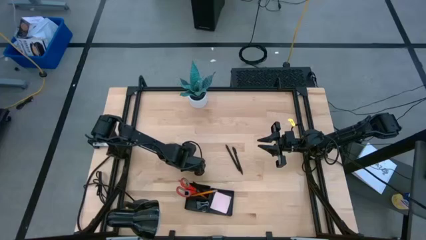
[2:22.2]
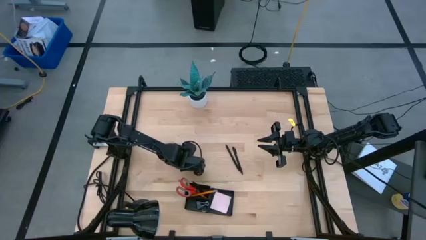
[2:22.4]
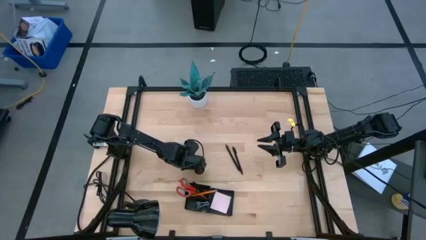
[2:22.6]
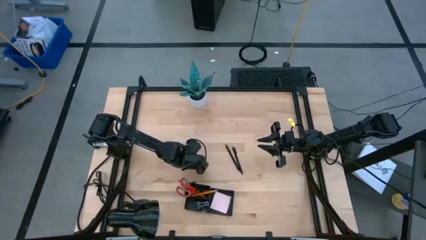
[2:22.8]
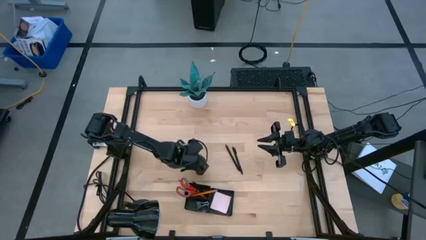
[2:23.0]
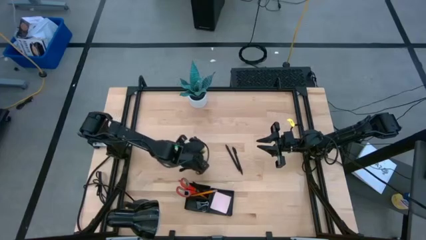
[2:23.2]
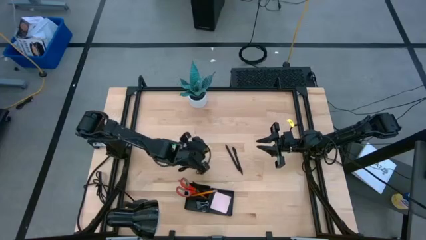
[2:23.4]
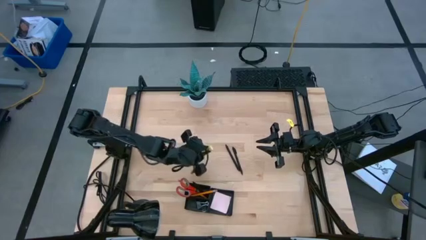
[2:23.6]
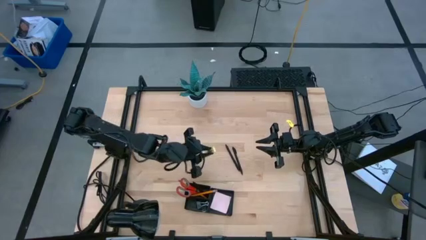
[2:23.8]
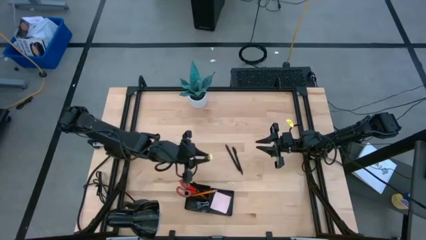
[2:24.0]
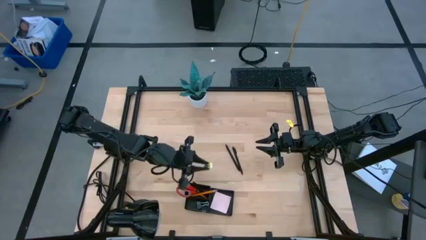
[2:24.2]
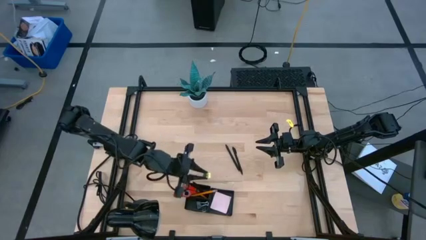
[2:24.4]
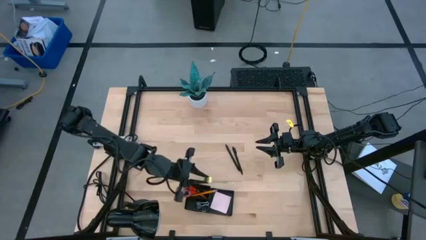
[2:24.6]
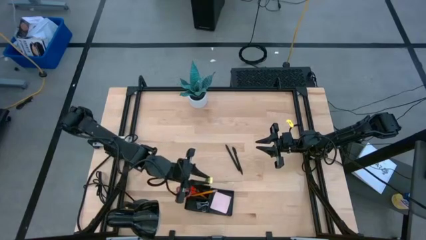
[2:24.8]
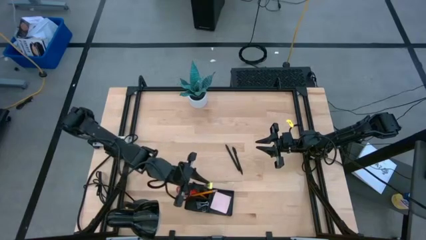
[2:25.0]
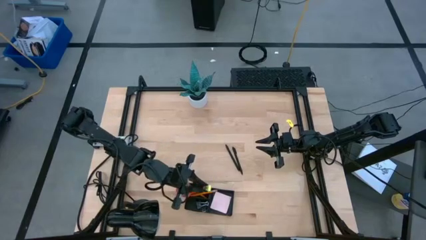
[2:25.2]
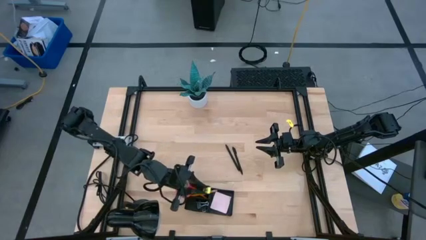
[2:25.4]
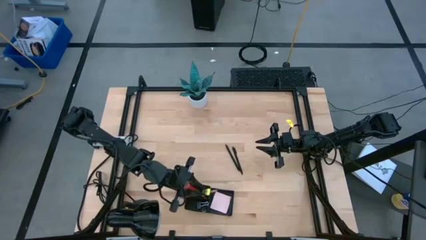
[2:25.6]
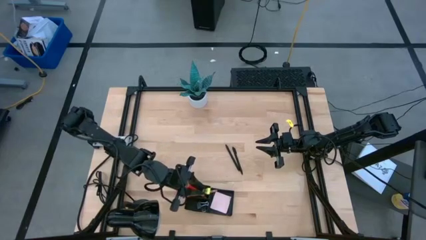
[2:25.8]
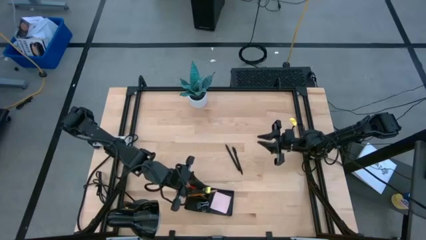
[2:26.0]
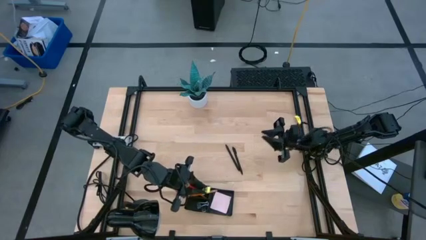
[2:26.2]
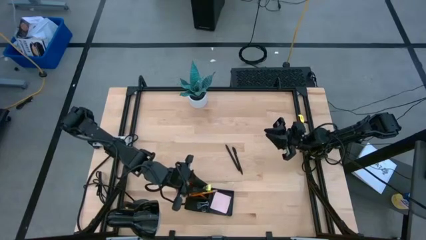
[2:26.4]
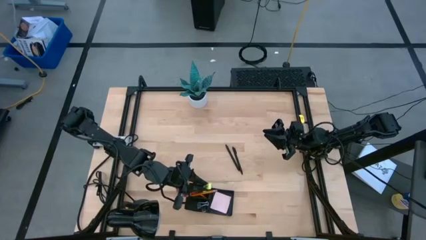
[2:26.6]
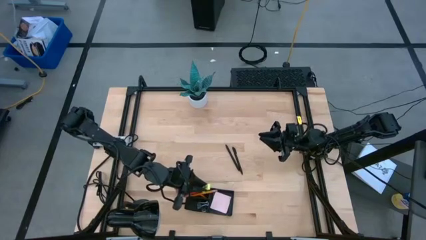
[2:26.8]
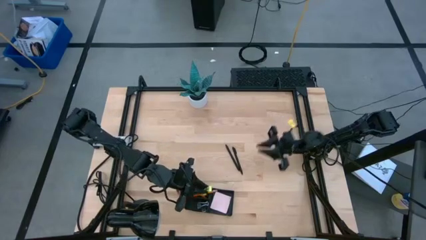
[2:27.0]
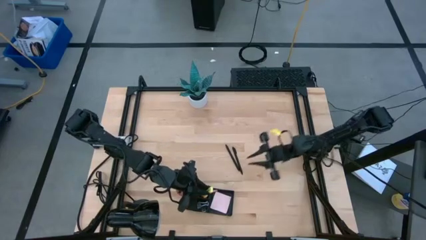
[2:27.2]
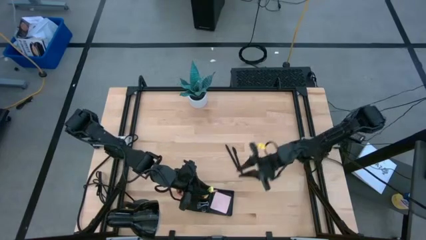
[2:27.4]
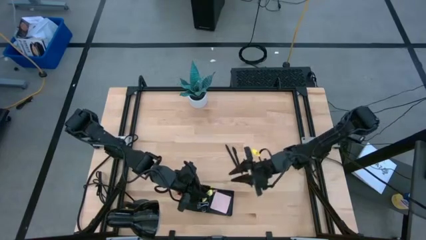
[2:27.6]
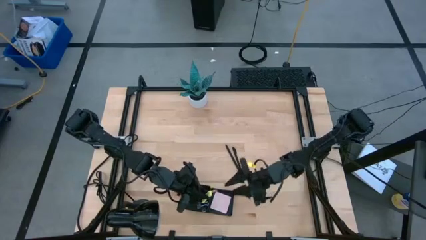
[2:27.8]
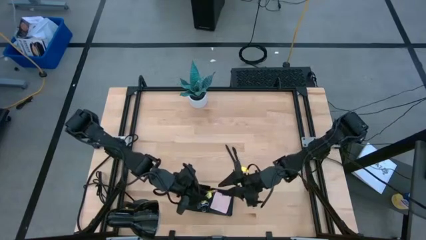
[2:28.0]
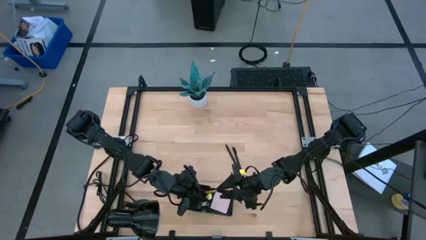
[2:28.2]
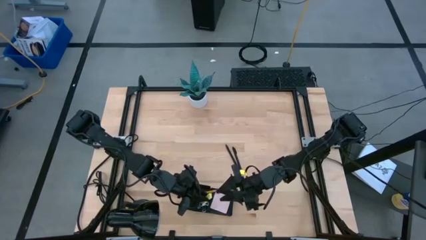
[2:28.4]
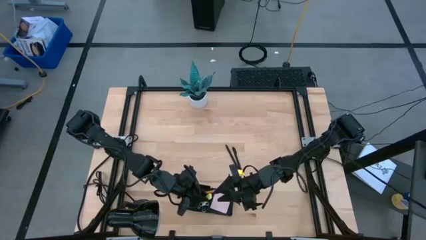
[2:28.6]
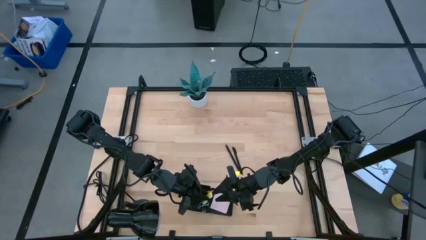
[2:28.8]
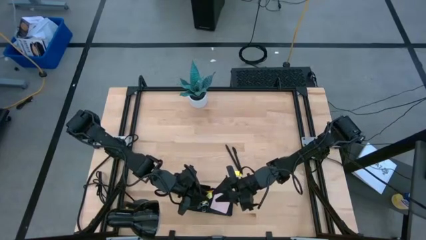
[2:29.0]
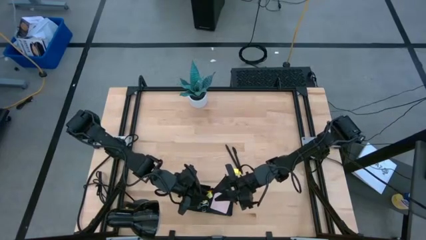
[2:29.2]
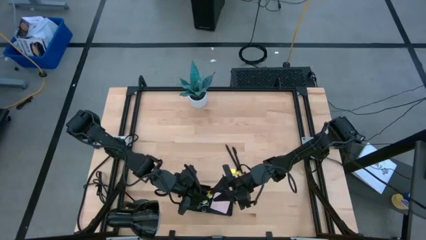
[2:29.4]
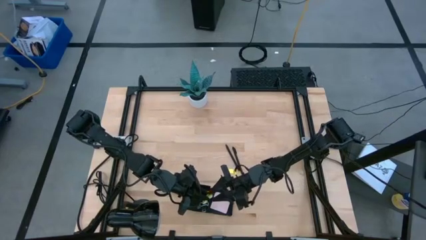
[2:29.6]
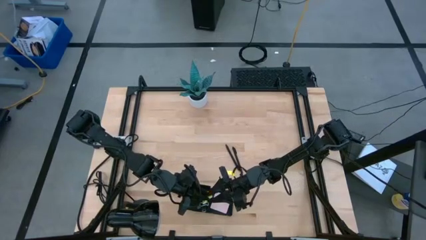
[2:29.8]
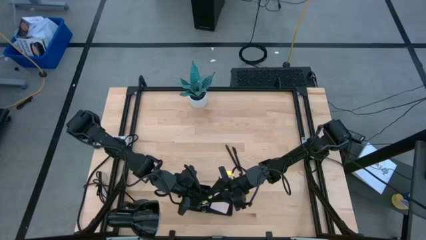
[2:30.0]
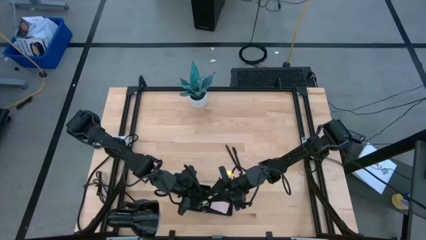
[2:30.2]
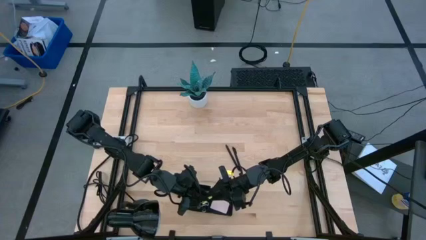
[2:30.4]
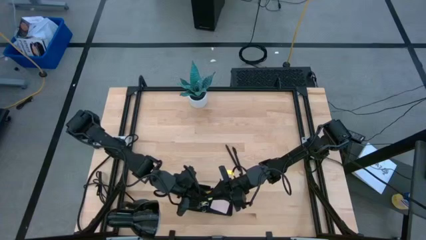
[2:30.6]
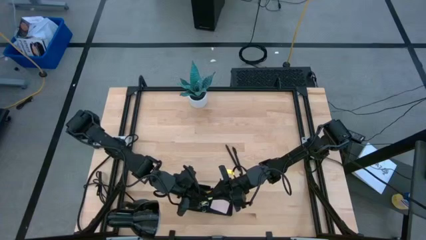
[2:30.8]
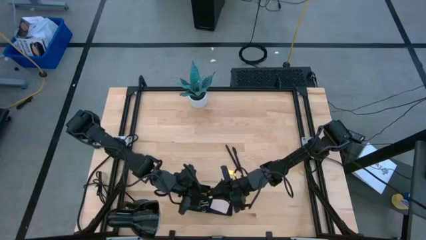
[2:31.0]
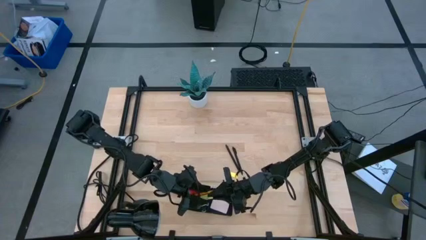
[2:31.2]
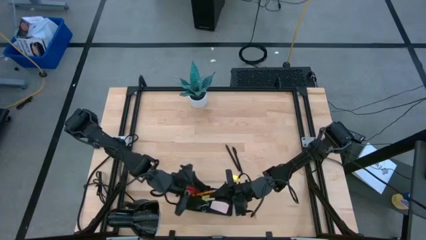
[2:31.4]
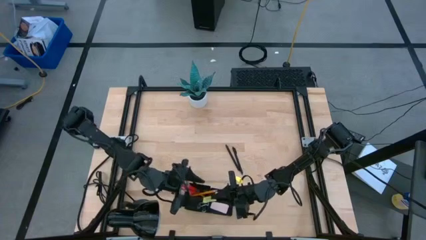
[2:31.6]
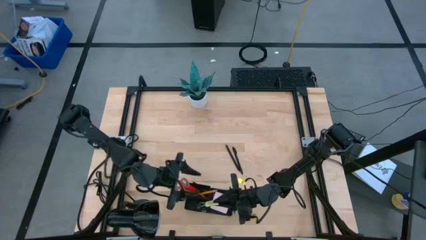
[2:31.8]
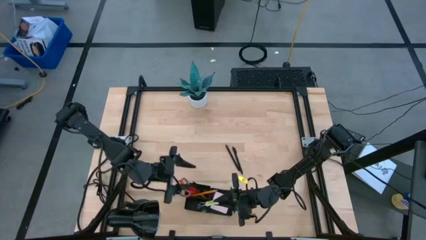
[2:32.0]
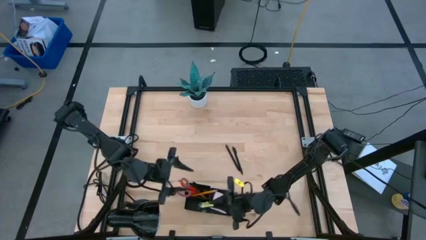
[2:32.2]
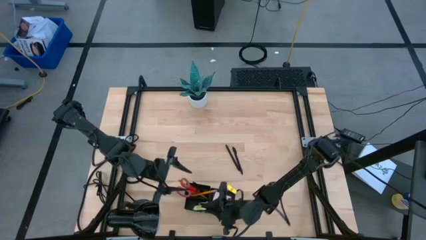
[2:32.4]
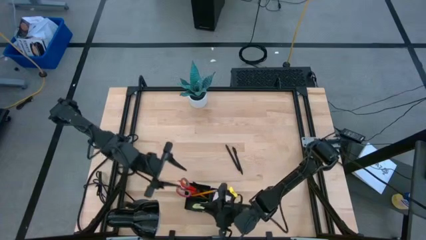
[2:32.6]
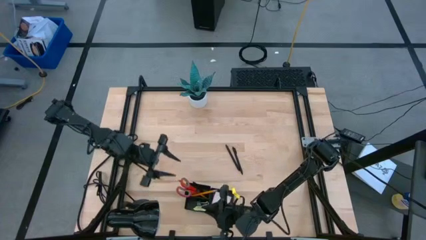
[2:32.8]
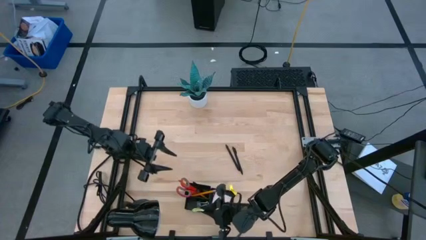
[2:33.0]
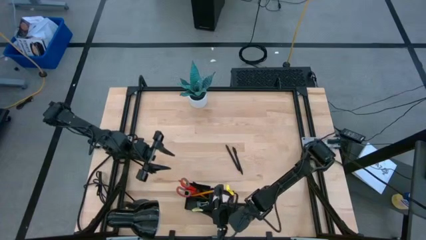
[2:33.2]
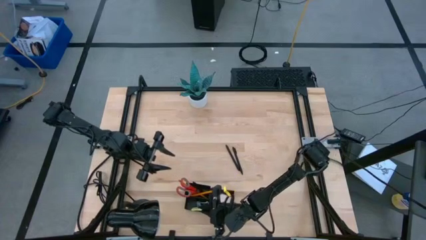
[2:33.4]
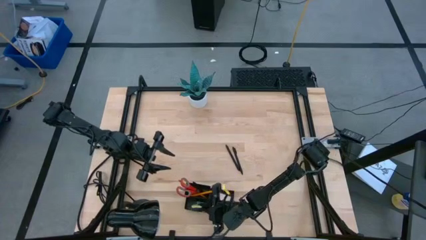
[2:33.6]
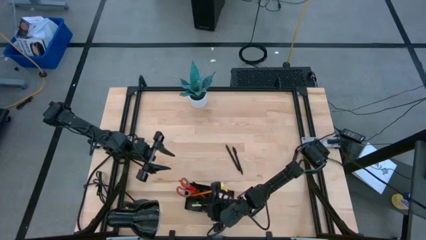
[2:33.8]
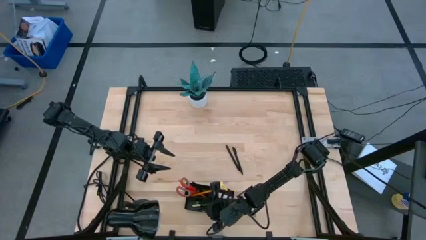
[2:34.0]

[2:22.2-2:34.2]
Task: Pick and place office supplies into organizer
Put the light green eraser into the black desk organizer

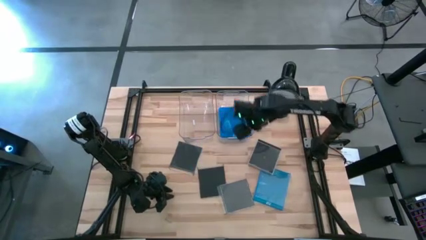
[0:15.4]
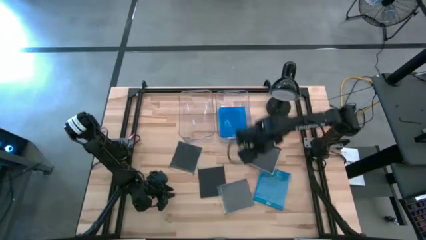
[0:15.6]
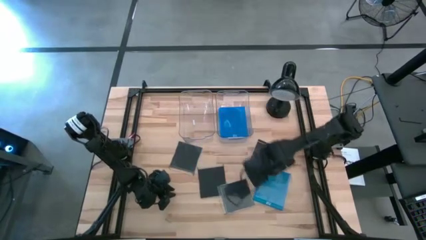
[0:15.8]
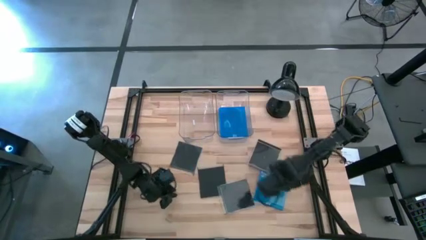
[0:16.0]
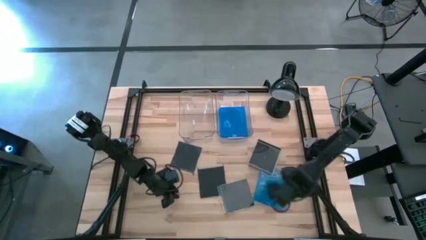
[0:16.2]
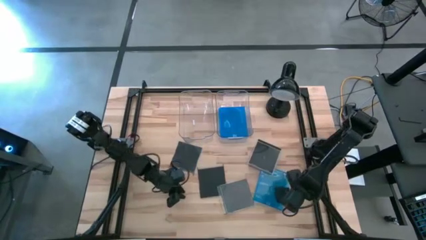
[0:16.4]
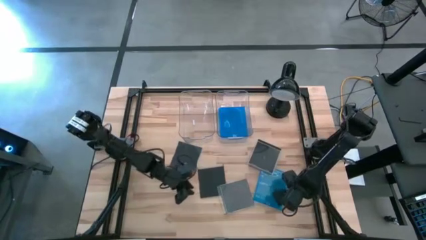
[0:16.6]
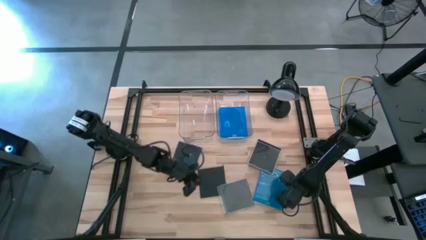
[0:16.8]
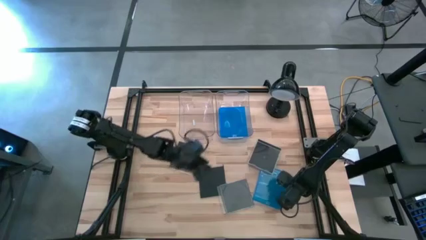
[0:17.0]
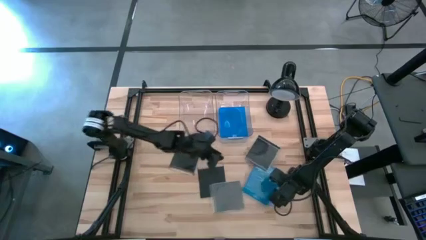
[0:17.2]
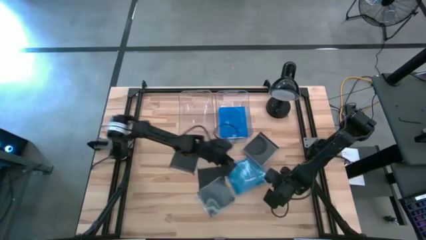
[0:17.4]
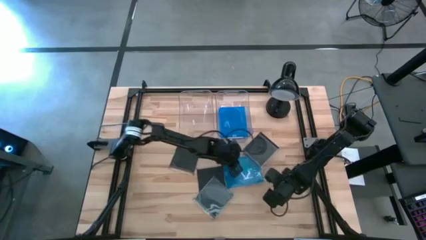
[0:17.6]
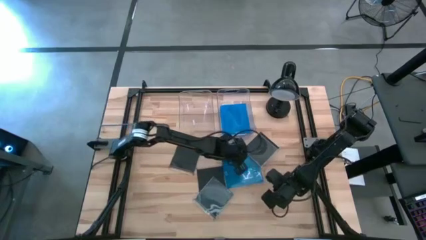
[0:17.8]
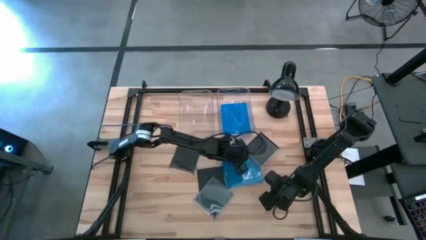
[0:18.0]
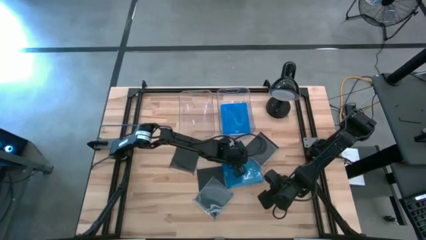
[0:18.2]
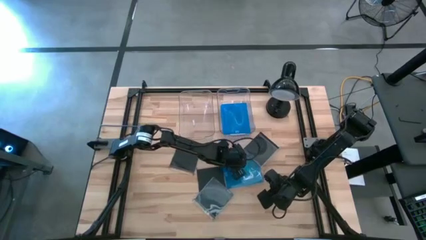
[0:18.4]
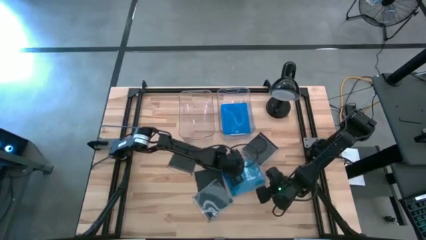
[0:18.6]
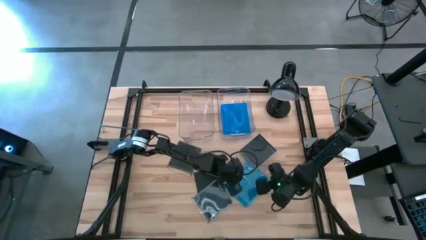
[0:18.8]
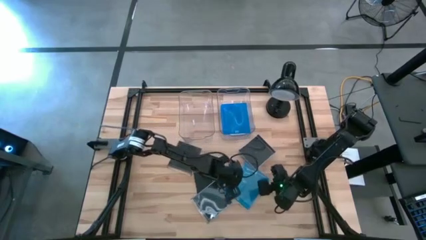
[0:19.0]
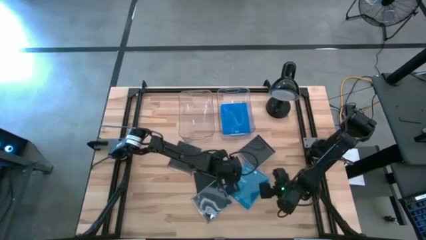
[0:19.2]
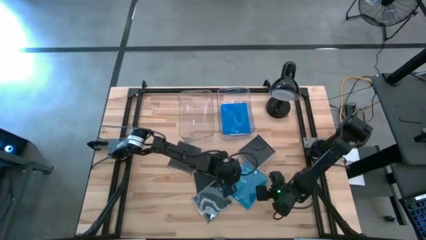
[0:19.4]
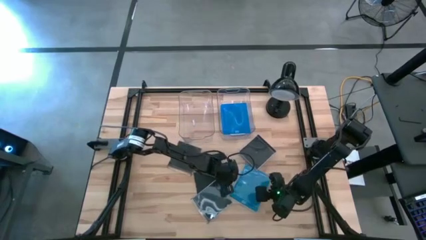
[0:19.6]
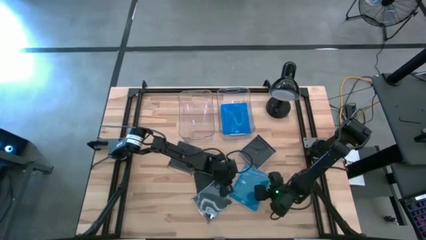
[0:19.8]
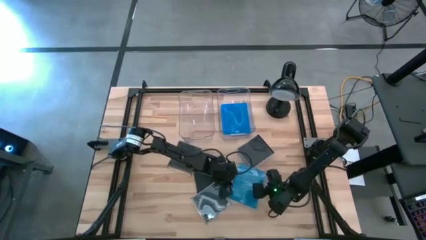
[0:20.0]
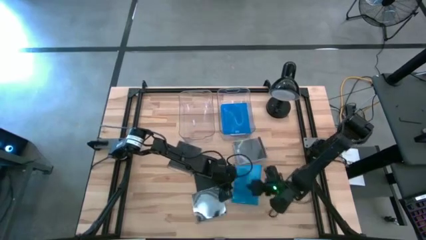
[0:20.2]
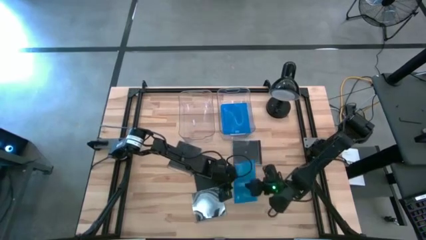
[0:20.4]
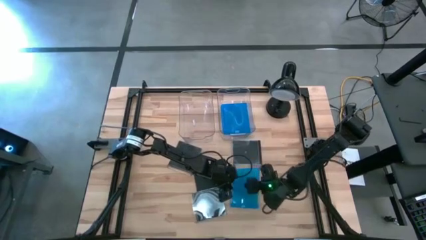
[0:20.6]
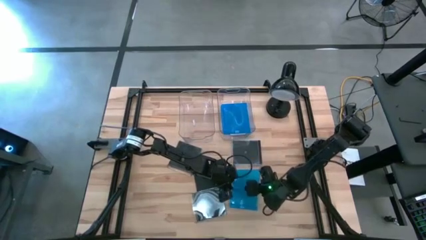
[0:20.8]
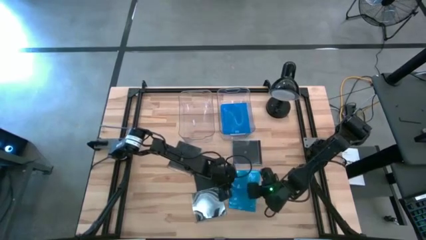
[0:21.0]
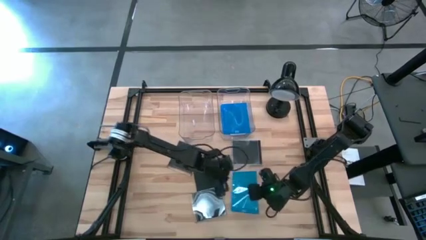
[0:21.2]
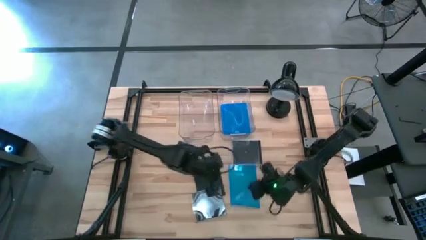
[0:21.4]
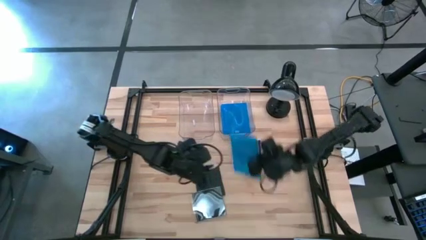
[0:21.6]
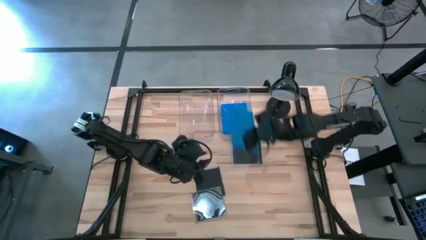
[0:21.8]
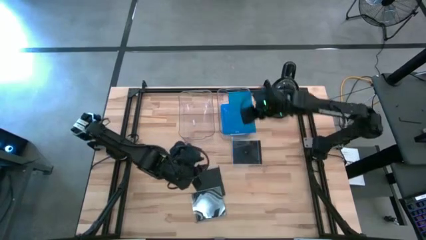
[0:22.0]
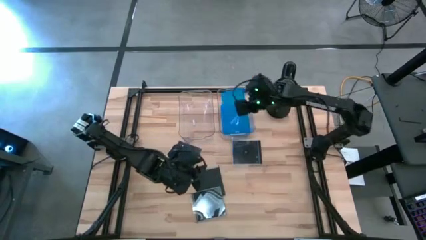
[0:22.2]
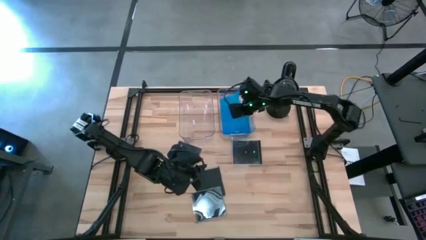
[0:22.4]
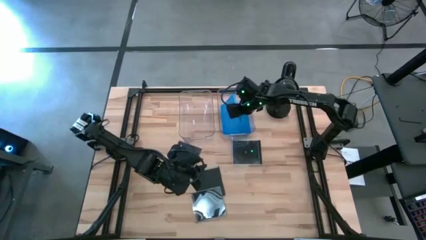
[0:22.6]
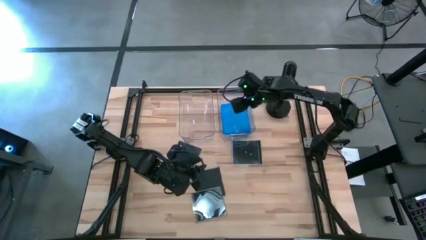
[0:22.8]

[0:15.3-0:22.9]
Task: Pick & place jewel cases by type
Put the blue CD case into the right transparent bin
